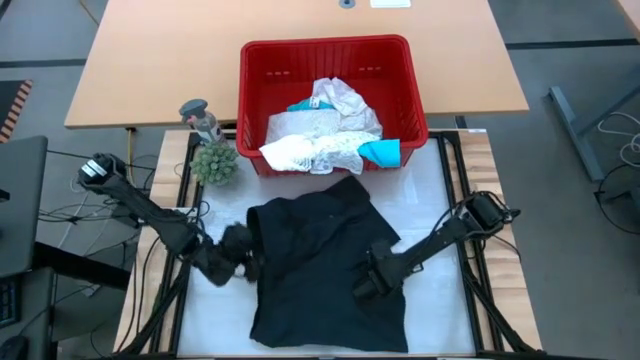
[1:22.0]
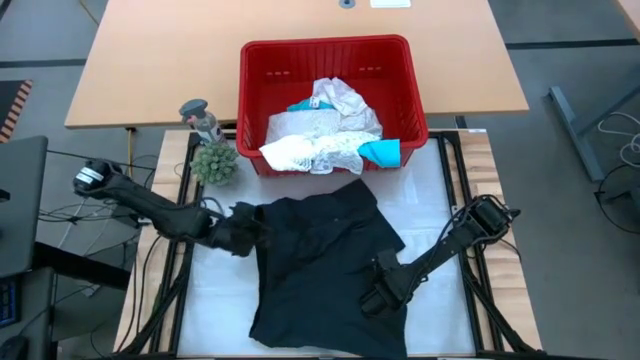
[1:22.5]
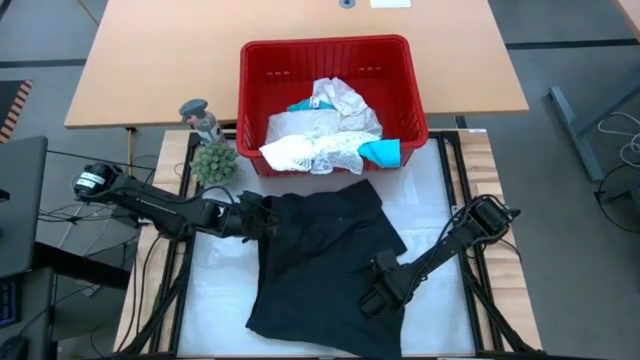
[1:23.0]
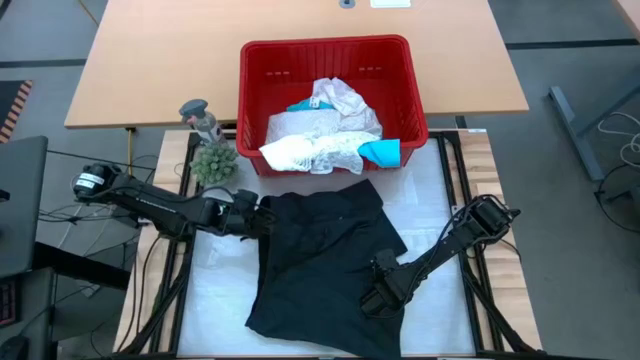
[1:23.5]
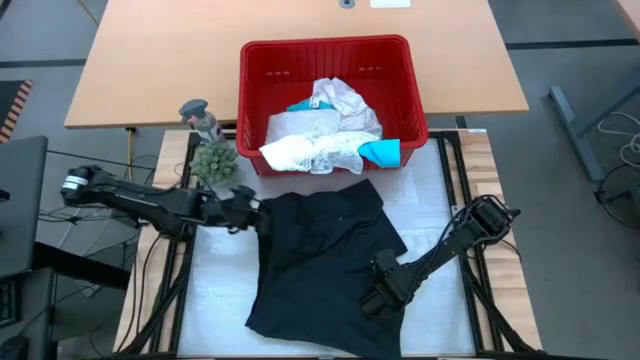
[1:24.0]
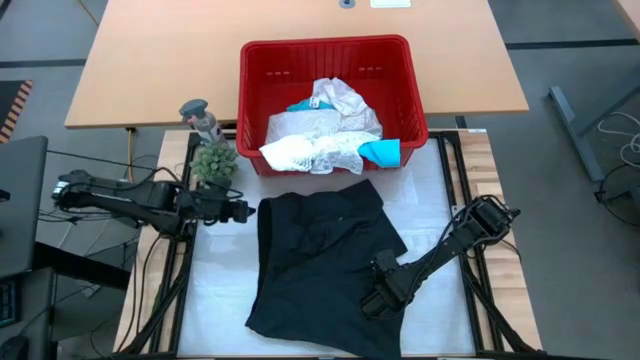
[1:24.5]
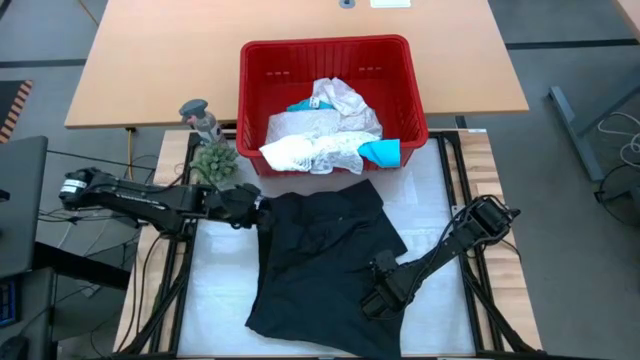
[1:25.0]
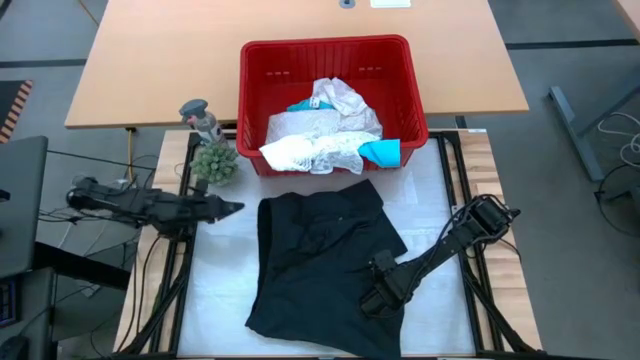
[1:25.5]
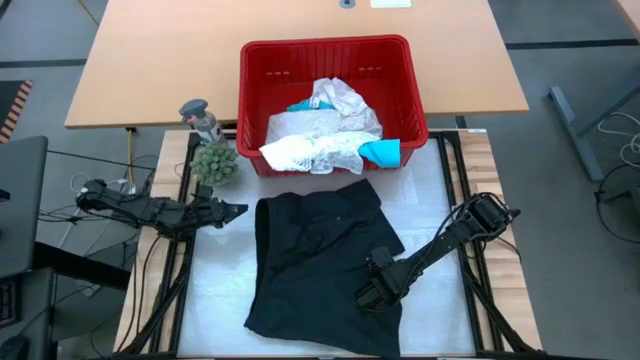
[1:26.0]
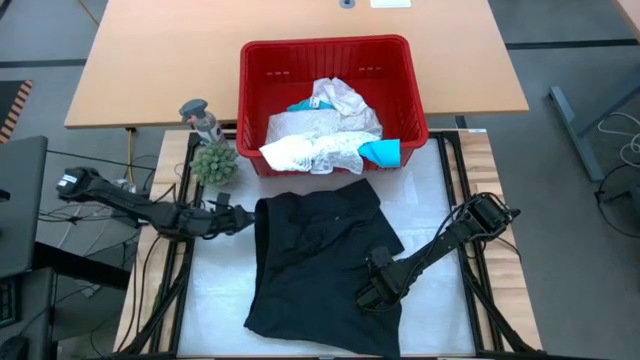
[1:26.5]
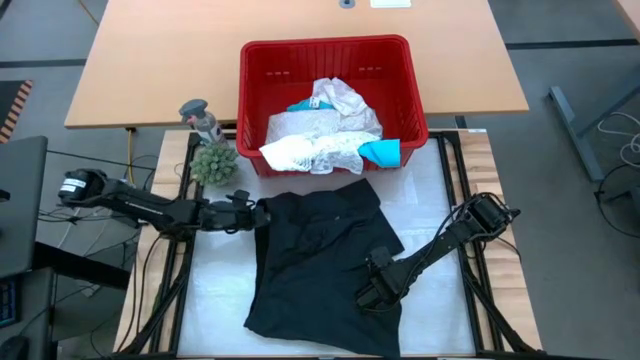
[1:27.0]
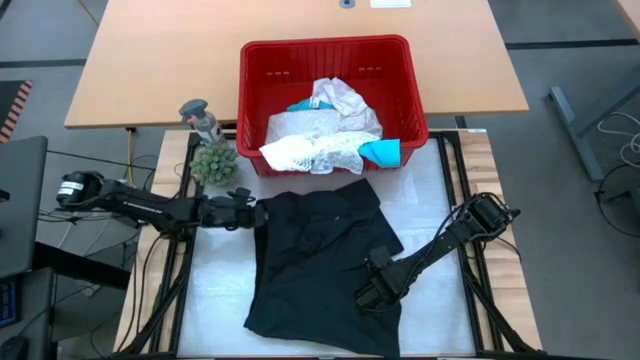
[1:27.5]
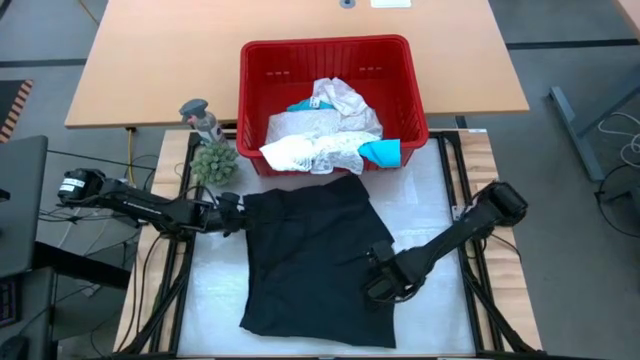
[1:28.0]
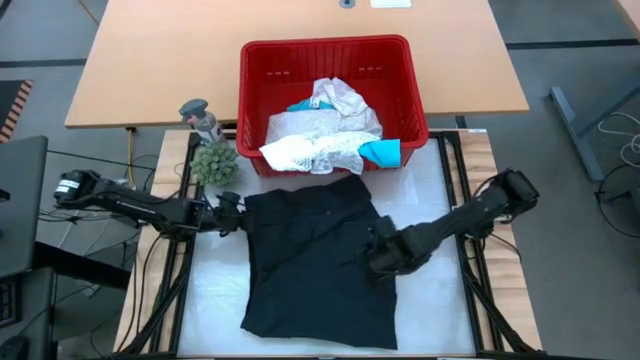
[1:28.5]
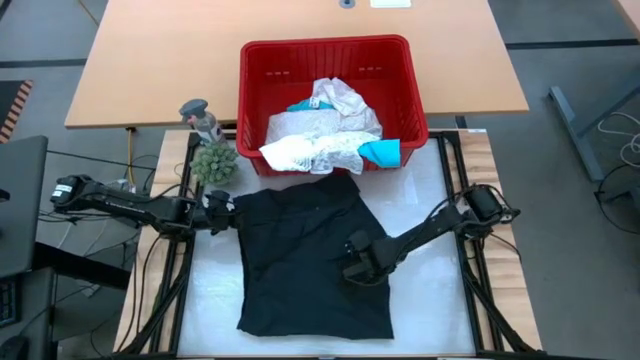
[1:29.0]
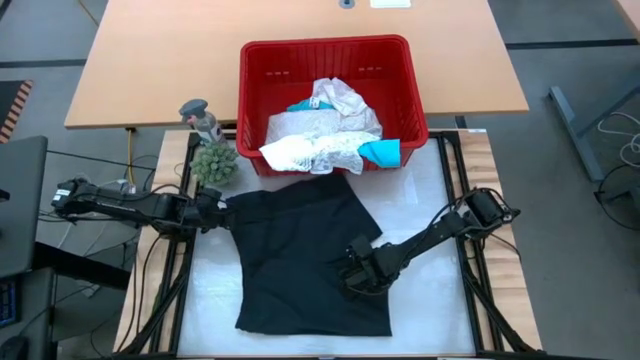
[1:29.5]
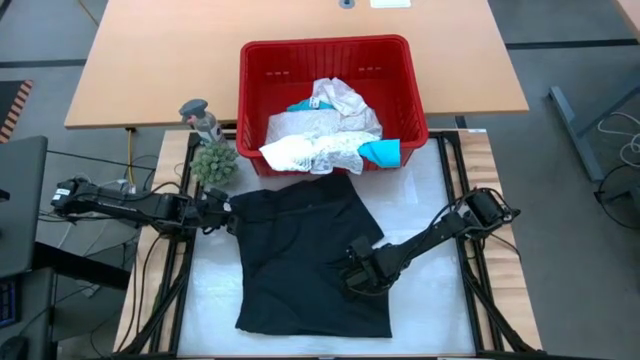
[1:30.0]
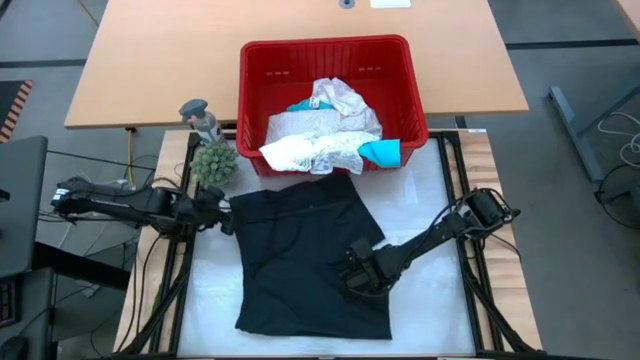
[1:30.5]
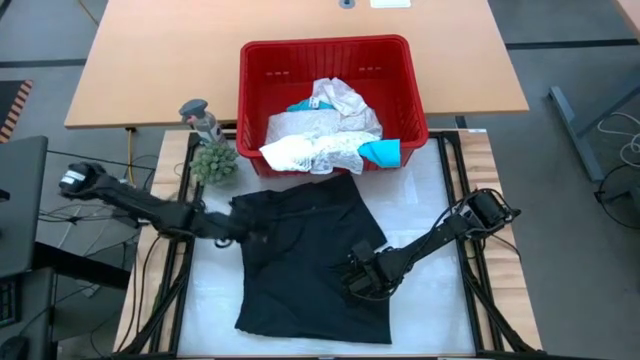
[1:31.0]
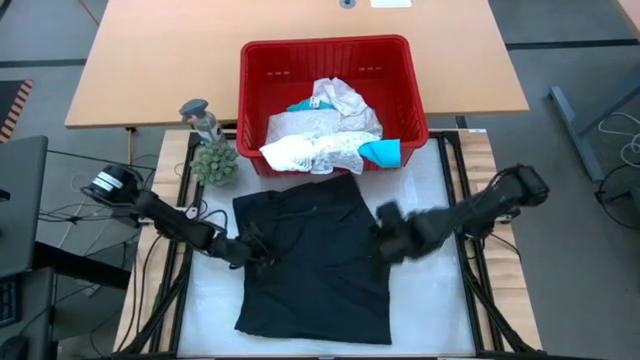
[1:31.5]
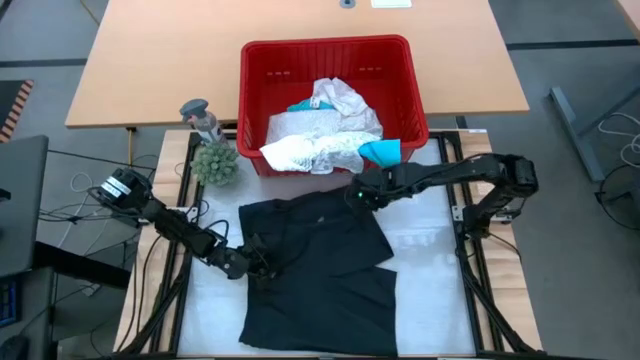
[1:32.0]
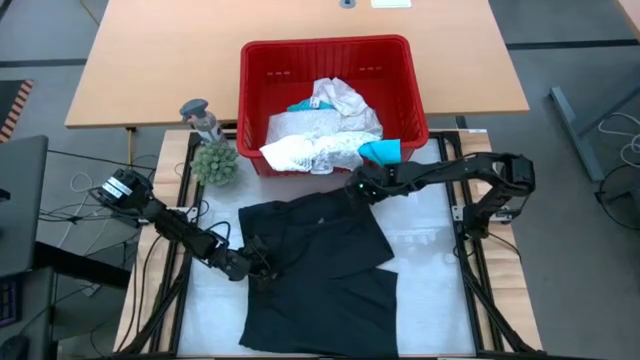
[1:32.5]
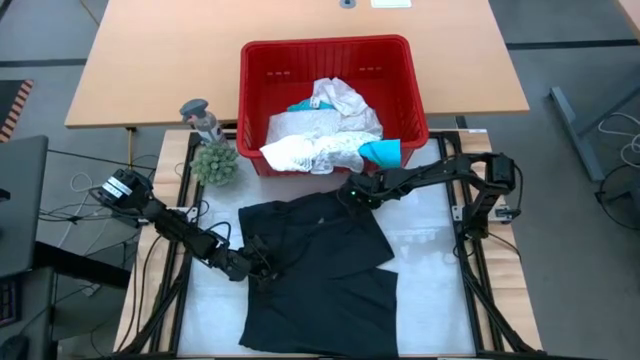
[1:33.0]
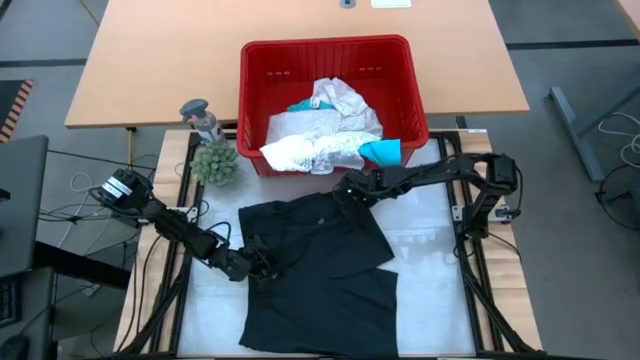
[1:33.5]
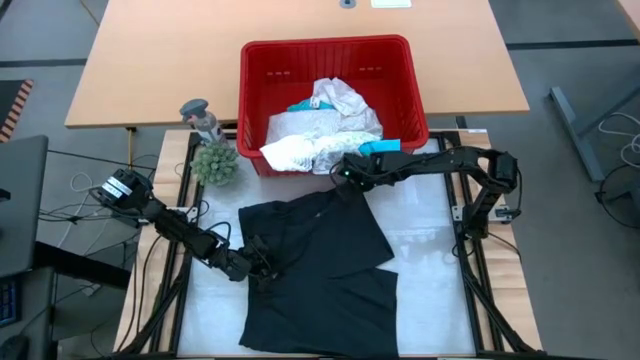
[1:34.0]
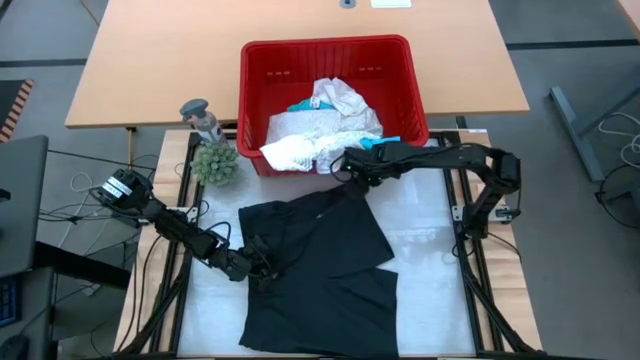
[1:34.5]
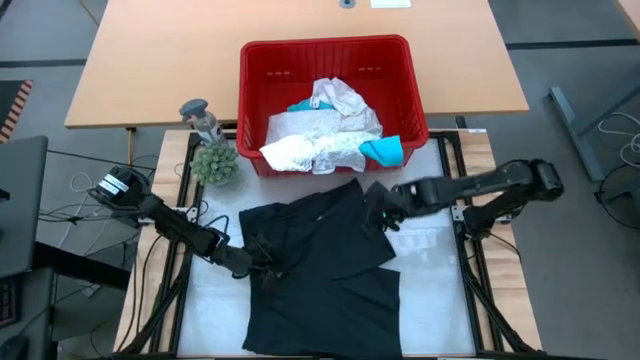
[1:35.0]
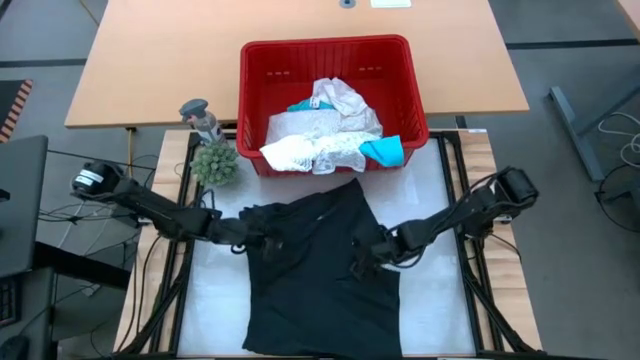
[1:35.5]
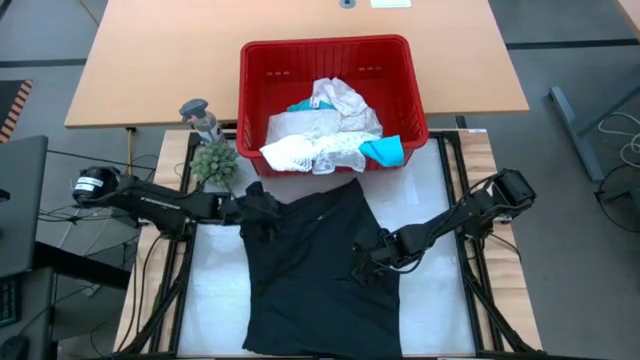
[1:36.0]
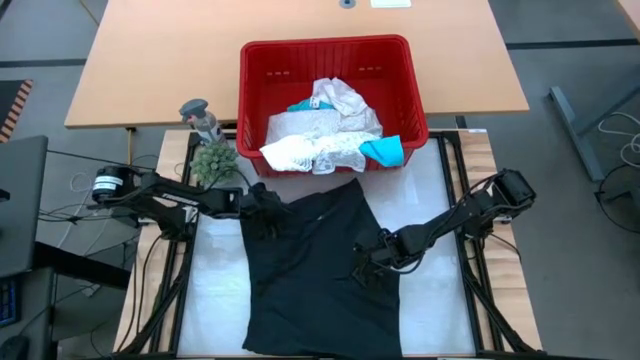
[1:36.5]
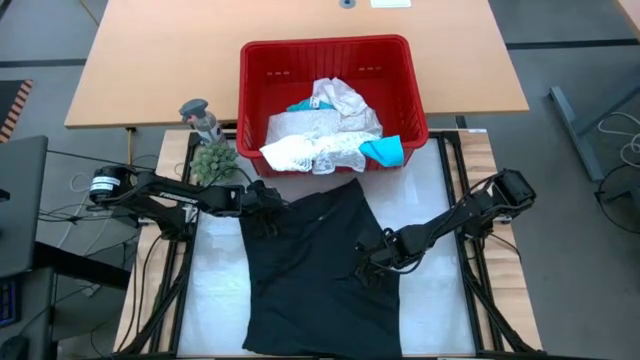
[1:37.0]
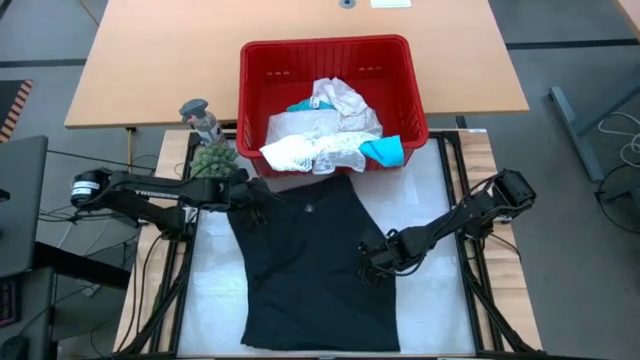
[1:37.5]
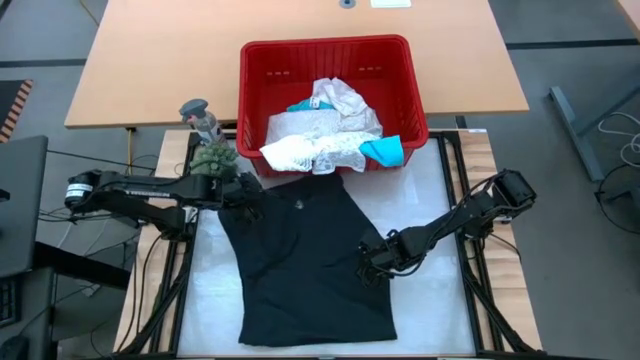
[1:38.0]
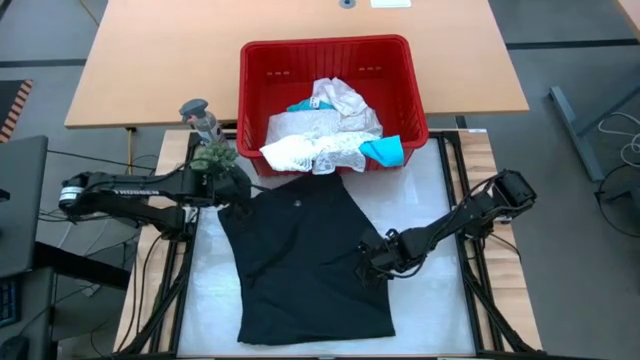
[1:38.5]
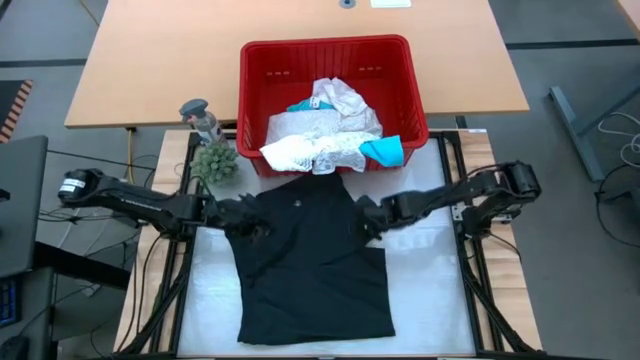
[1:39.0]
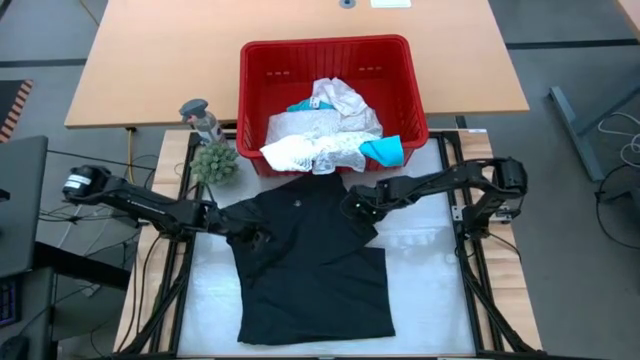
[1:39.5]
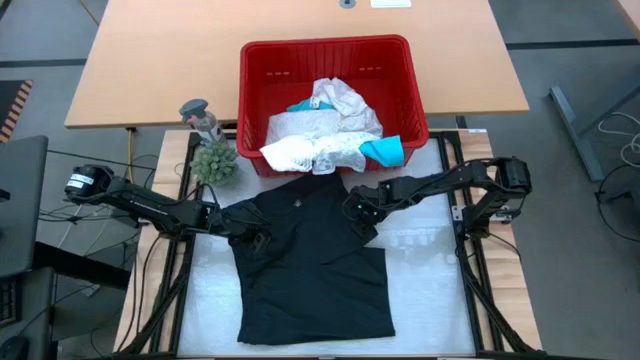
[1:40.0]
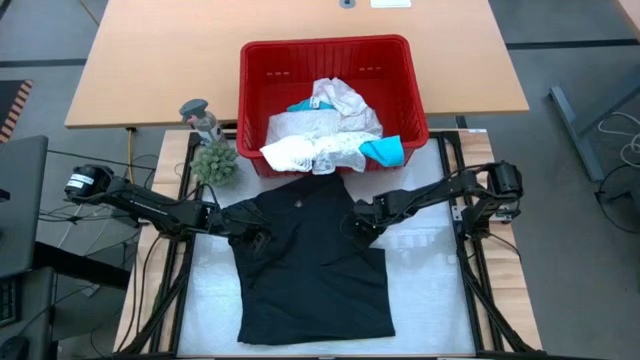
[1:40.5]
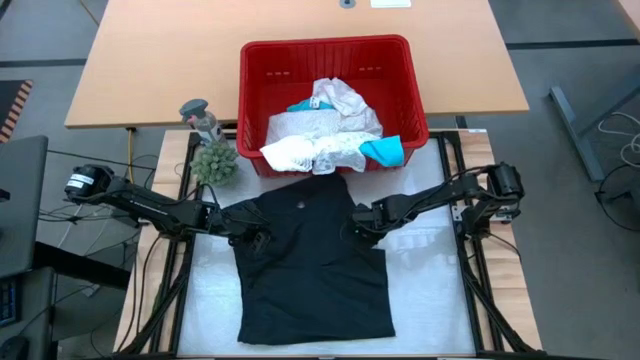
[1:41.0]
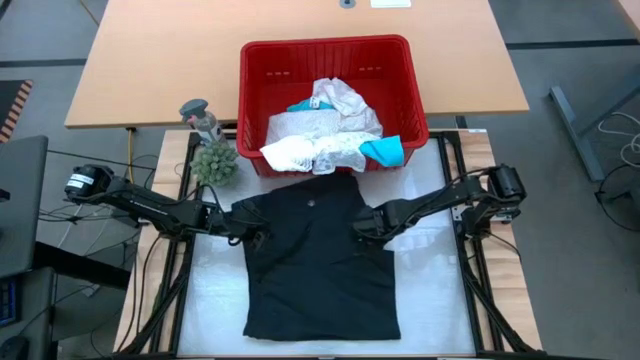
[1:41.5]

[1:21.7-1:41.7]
Task: Fold Laundry from Bin
Fold the black shorts
